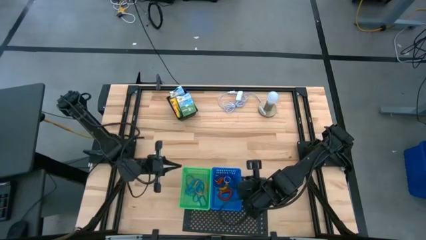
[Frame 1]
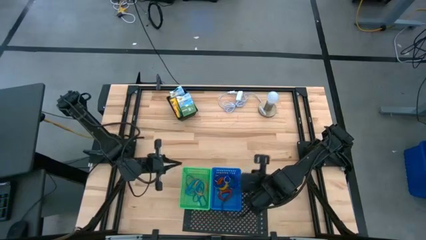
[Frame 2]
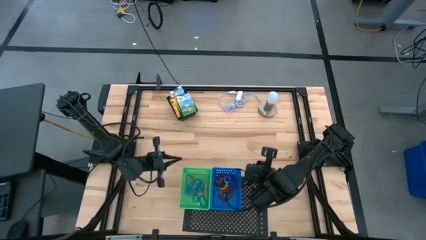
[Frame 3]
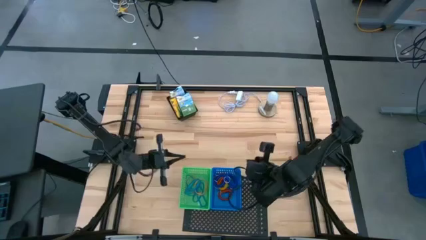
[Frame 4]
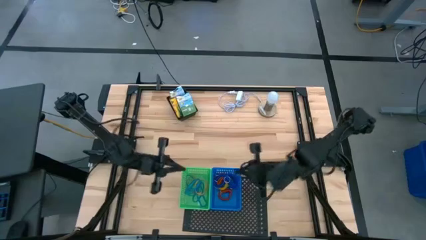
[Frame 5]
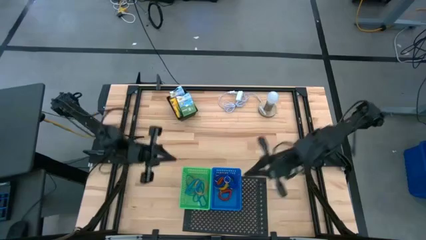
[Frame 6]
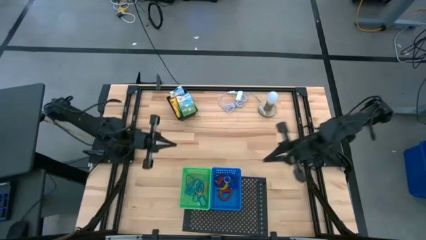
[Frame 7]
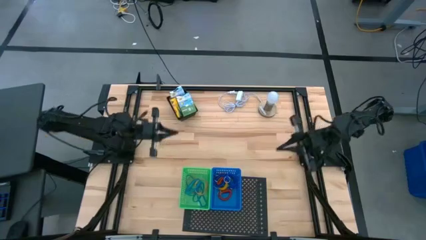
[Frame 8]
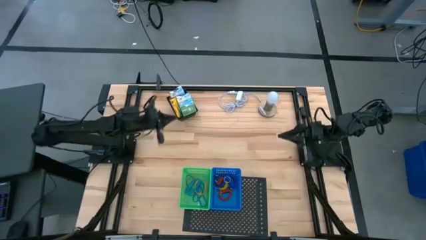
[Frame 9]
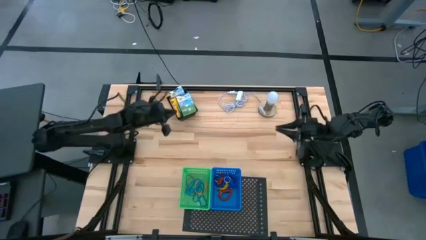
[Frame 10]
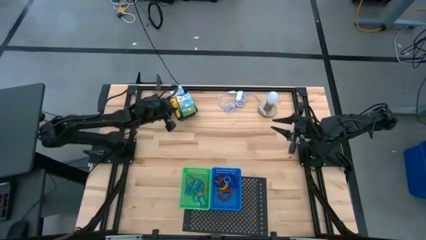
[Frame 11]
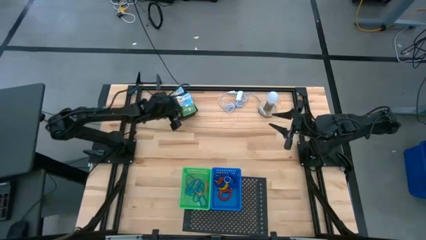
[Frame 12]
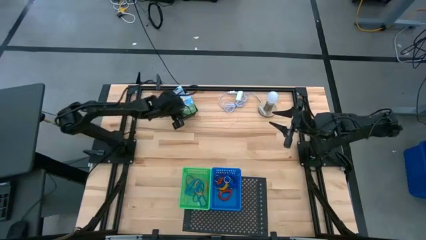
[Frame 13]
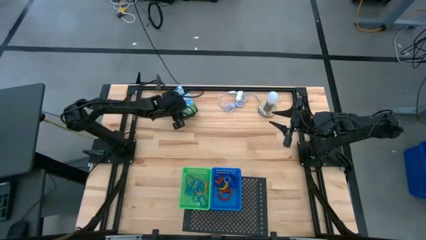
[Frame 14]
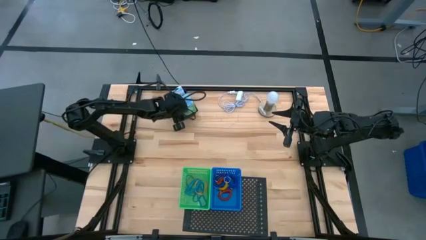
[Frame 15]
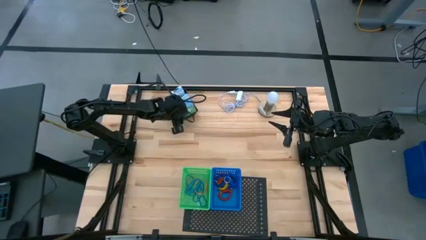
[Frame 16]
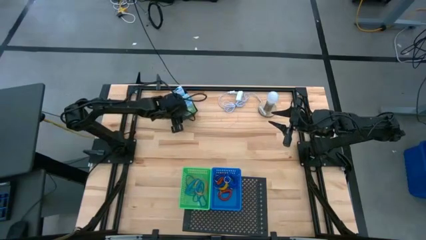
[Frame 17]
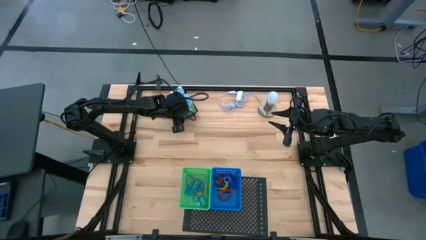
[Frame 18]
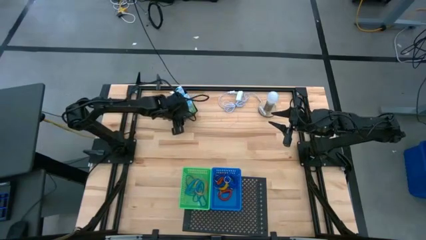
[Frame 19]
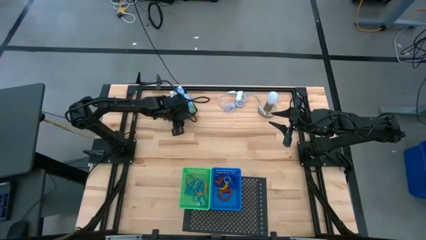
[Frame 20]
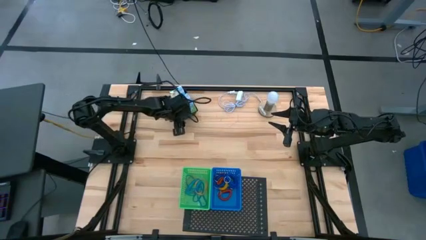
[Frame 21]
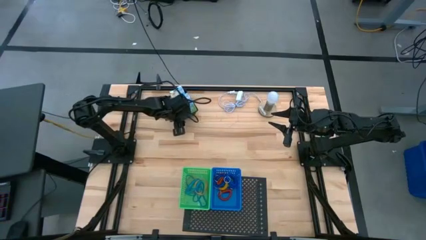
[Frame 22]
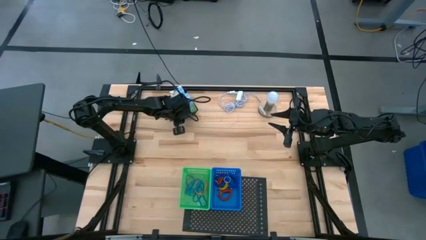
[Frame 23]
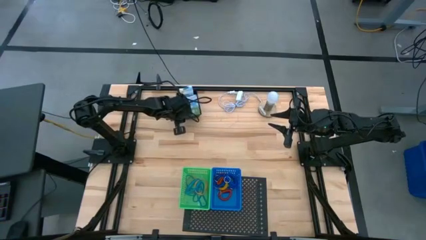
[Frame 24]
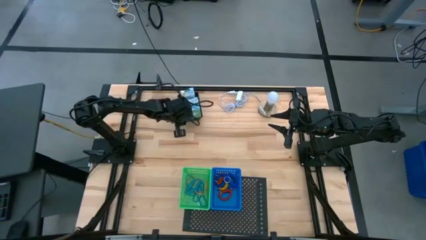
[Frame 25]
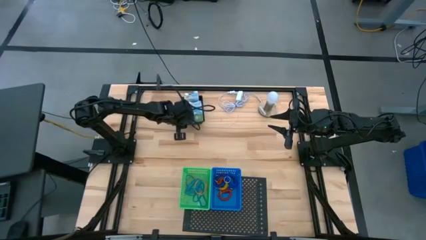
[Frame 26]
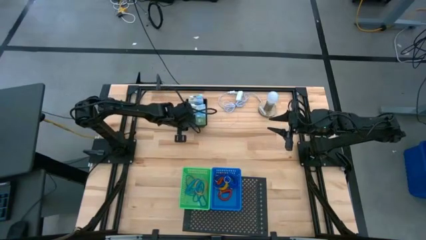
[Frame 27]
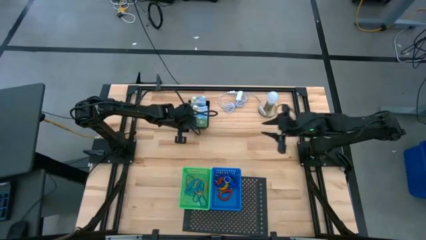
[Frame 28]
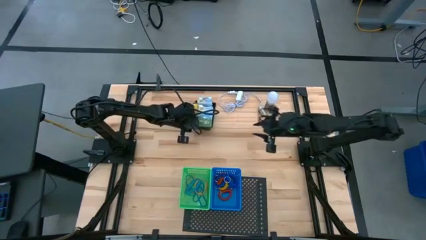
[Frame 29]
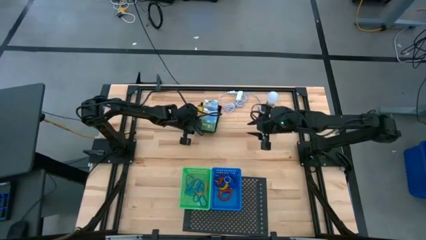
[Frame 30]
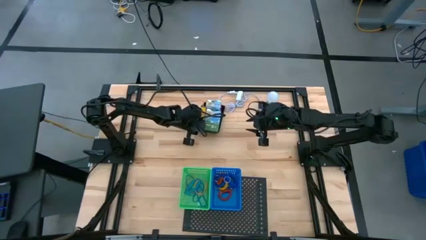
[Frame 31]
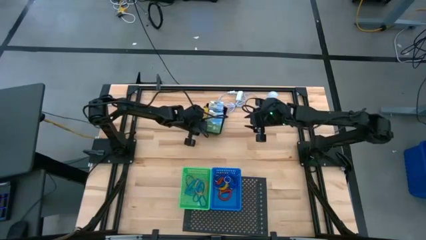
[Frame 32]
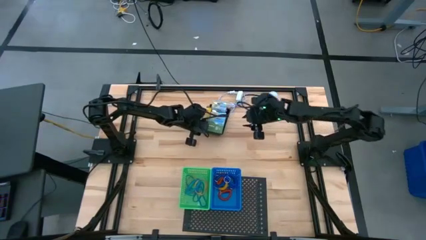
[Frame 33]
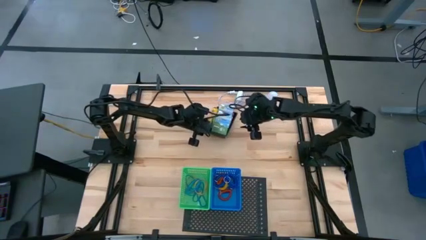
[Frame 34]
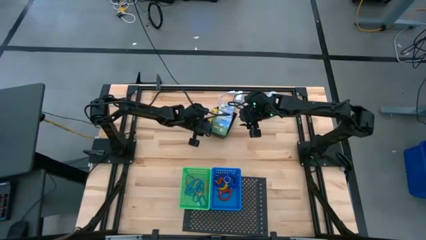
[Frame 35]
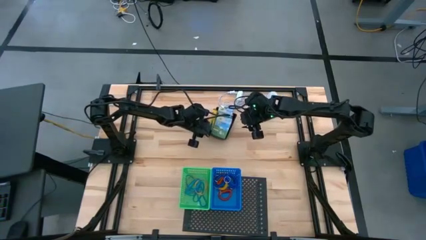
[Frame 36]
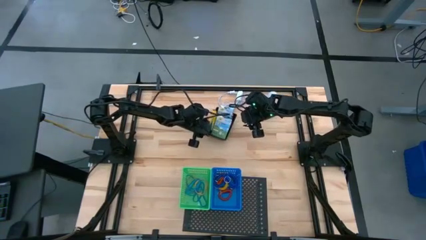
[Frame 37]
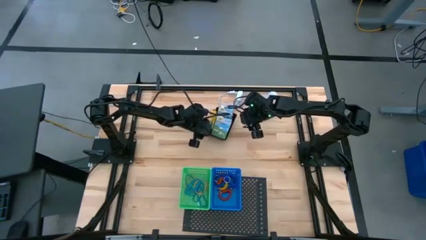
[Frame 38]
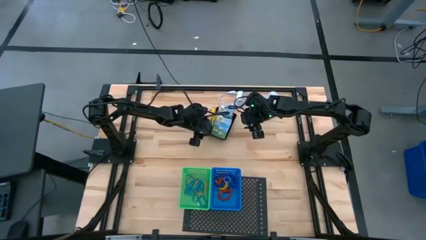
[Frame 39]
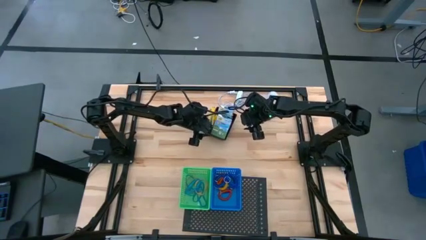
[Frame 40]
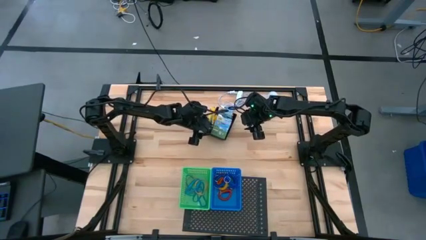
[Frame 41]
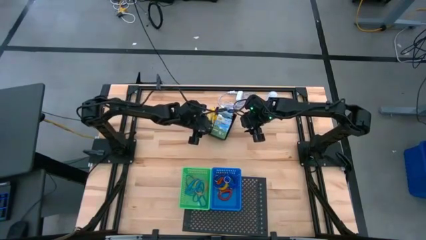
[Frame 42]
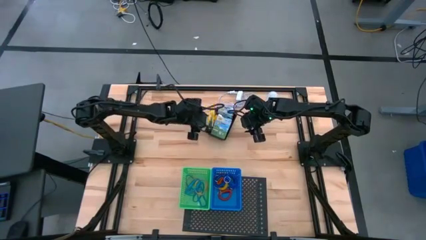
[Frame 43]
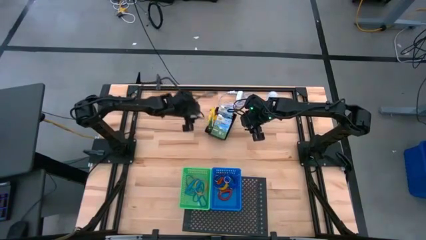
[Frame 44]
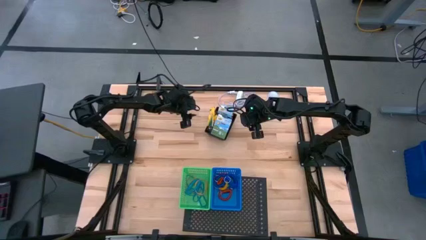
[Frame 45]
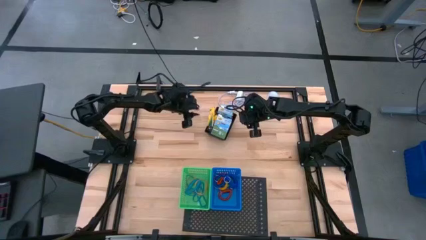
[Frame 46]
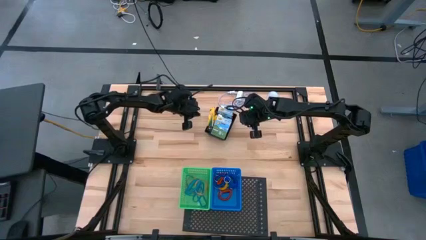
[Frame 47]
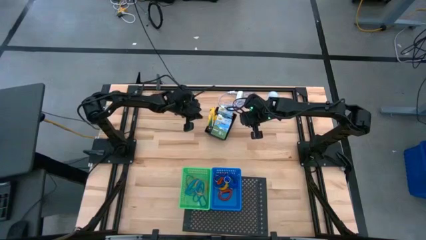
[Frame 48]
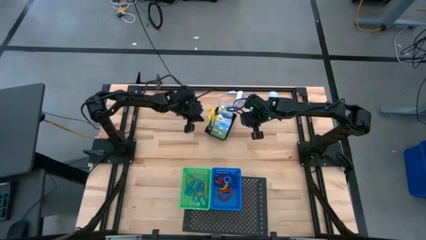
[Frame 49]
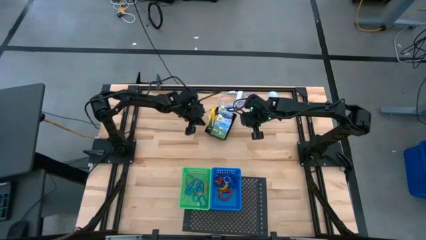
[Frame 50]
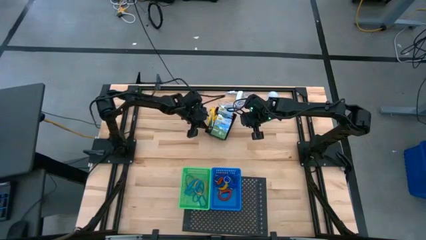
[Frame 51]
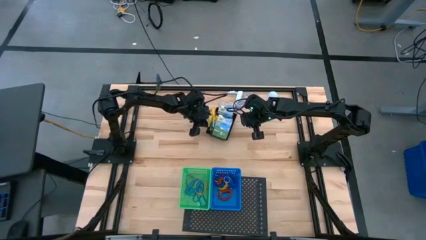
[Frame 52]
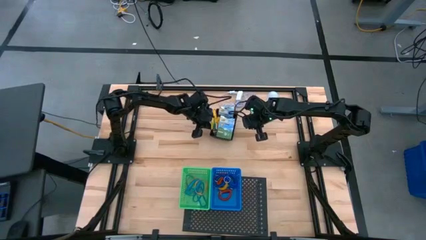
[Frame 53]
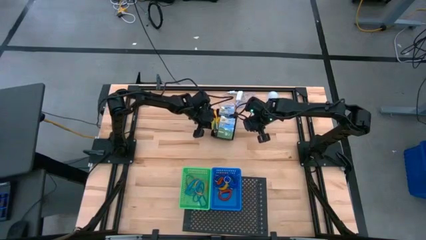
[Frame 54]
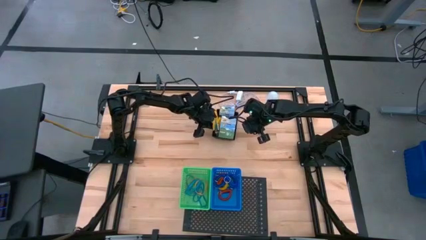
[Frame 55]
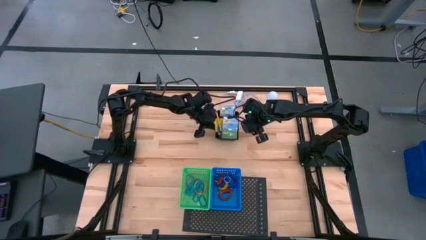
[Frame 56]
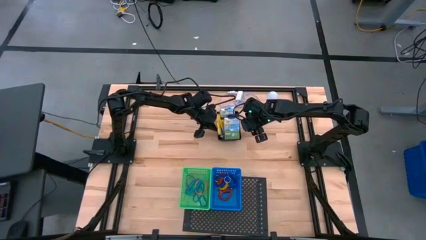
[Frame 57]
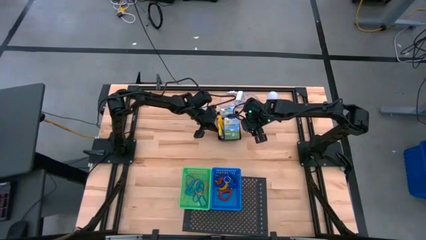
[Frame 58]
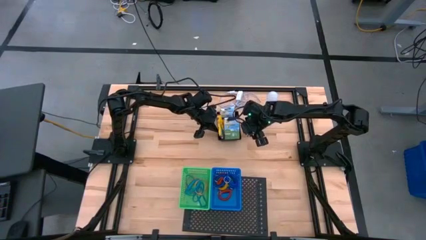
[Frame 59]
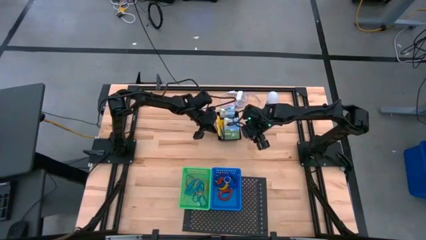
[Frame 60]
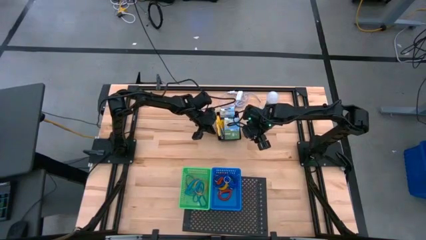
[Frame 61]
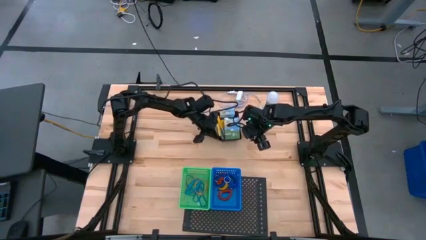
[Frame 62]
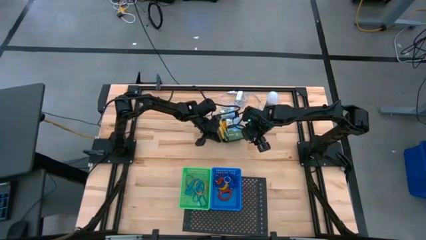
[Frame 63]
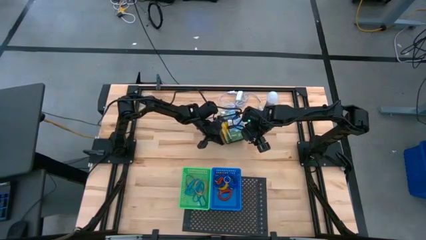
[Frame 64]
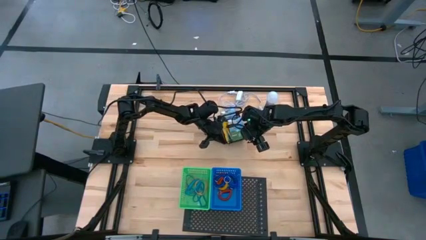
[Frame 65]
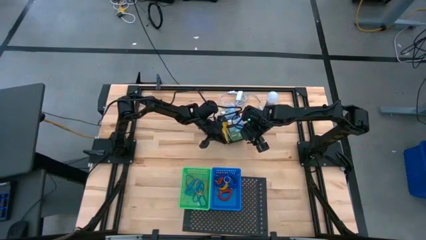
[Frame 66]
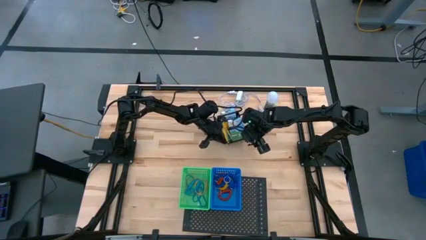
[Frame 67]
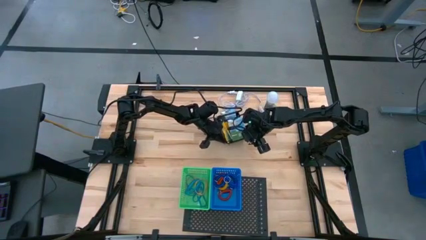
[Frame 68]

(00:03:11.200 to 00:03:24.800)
Task: Pick & Place Office Desk Supplies
Put the black bin on the shelf
